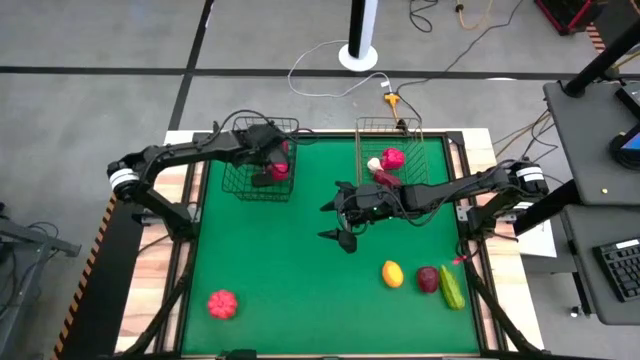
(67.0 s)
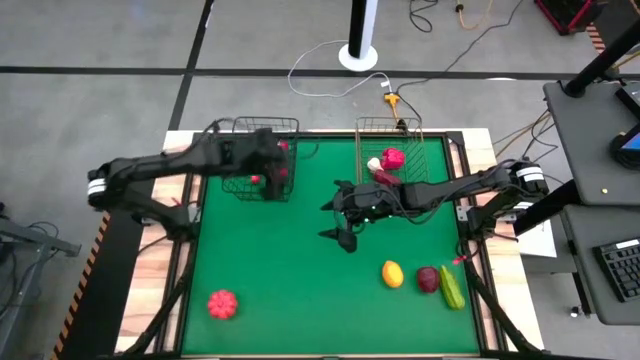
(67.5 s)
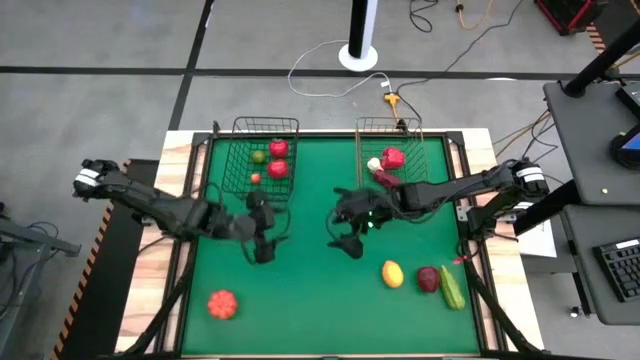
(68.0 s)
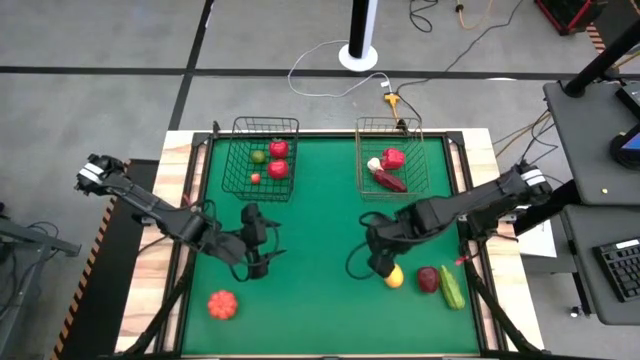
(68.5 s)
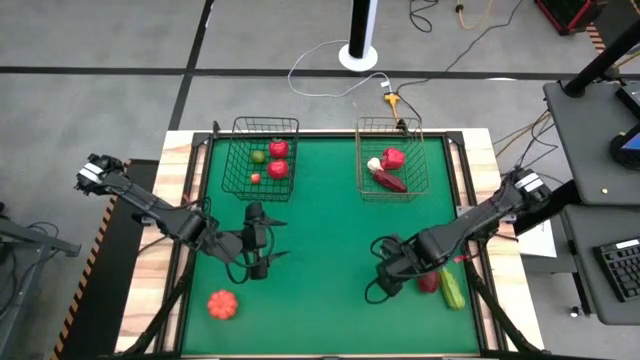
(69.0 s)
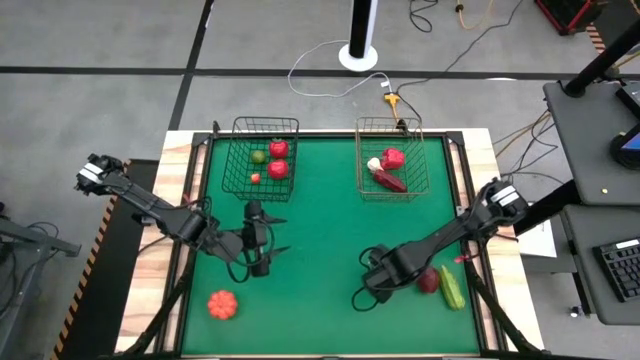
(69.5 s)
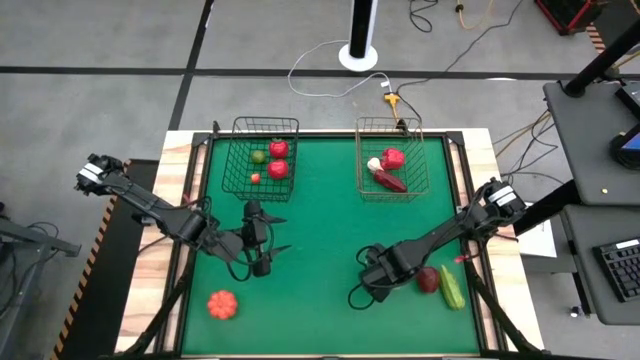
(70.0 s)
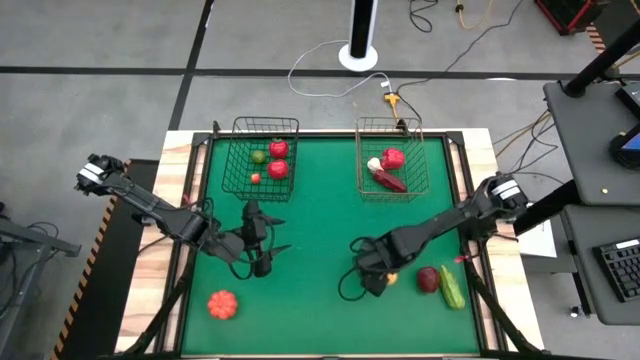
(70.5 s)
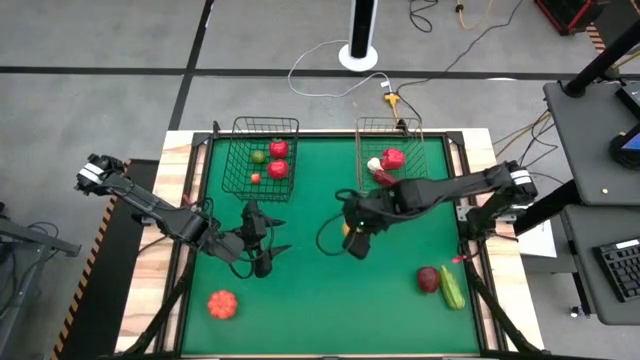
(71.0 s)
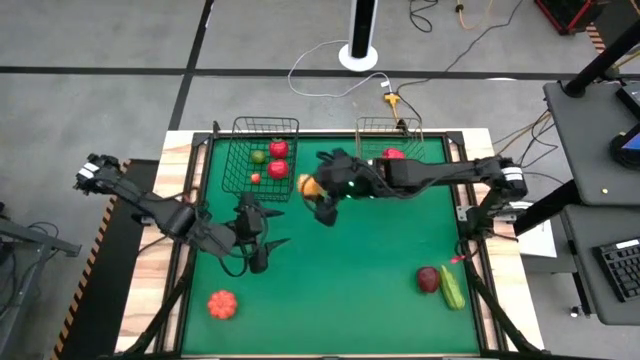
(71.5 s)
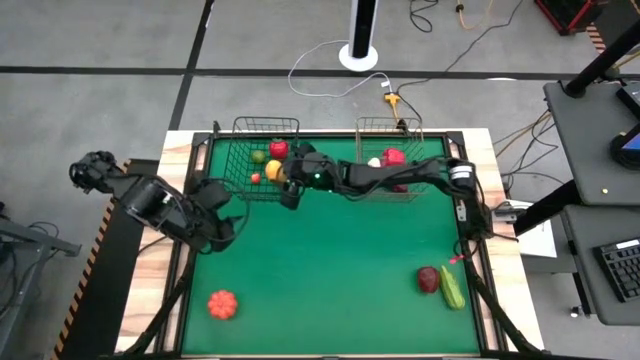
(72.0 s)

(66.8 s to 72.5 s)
Task: Sort produce into baskets
Put the lemon into the black wire basket

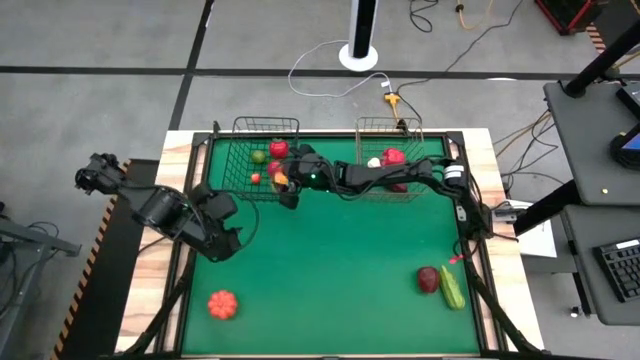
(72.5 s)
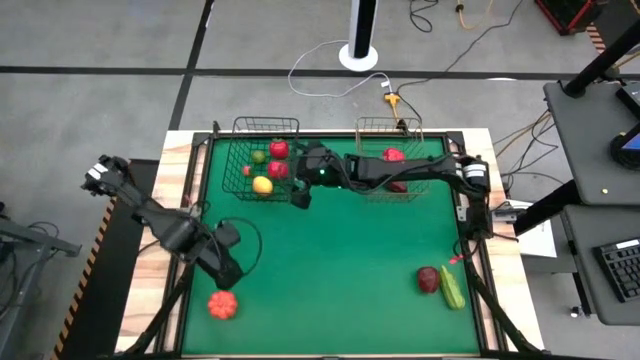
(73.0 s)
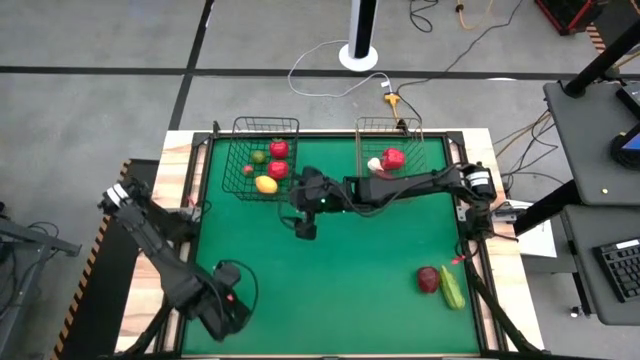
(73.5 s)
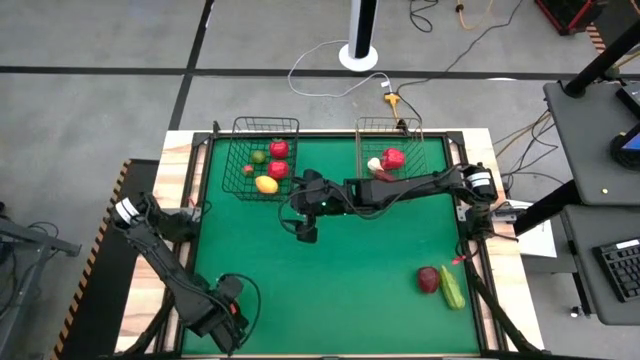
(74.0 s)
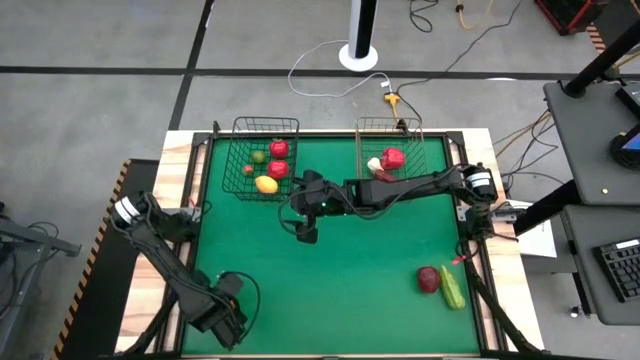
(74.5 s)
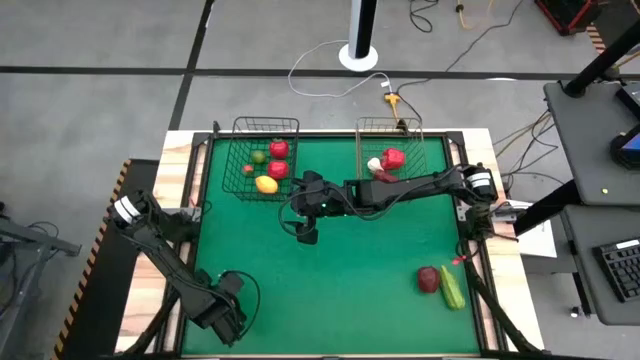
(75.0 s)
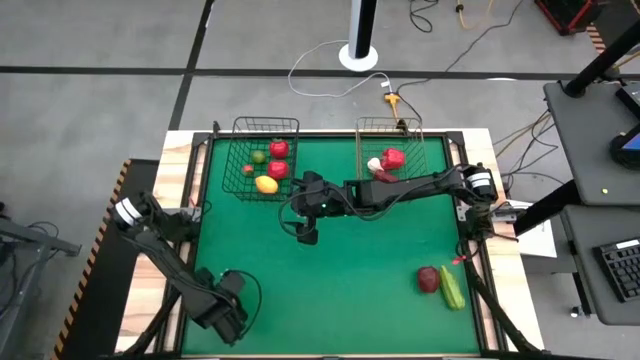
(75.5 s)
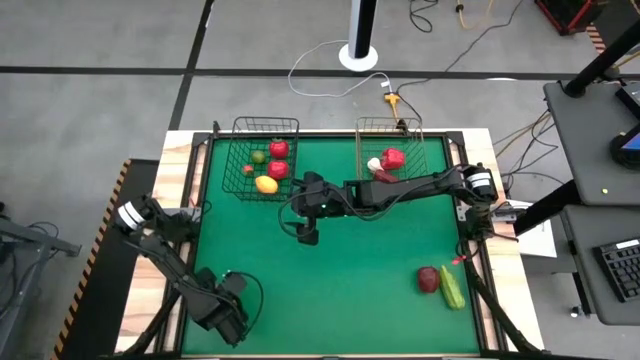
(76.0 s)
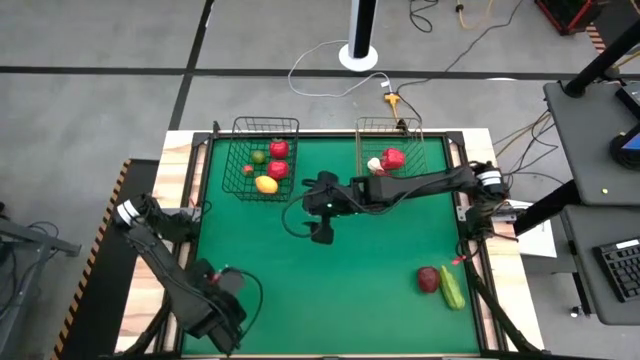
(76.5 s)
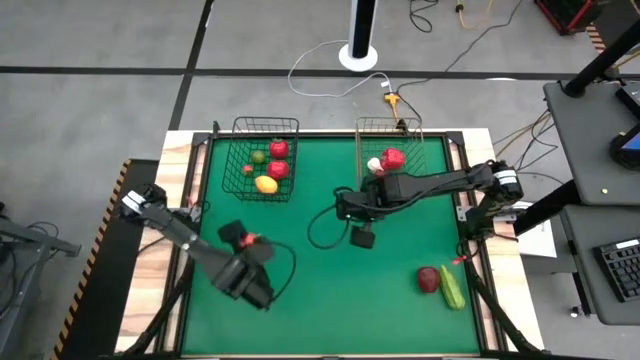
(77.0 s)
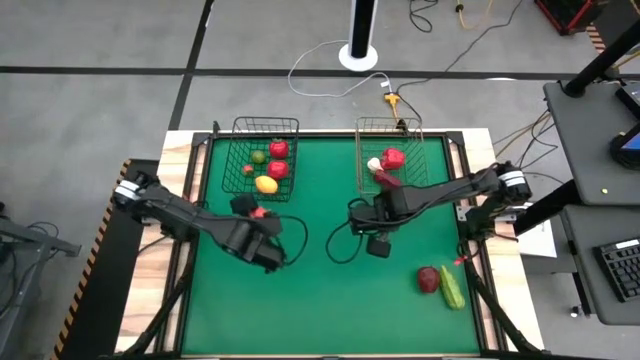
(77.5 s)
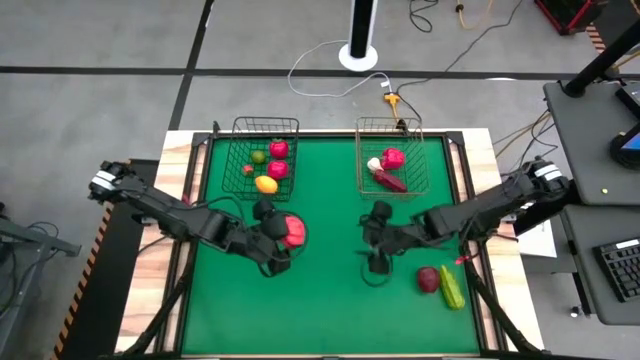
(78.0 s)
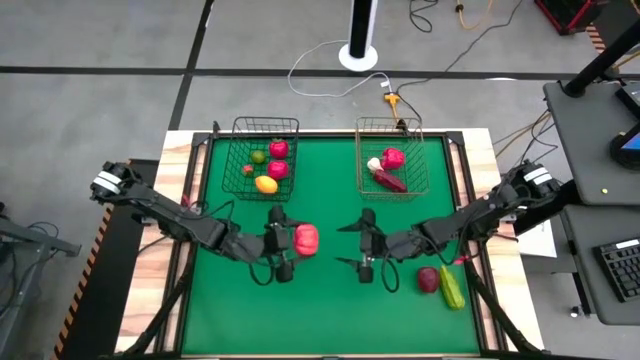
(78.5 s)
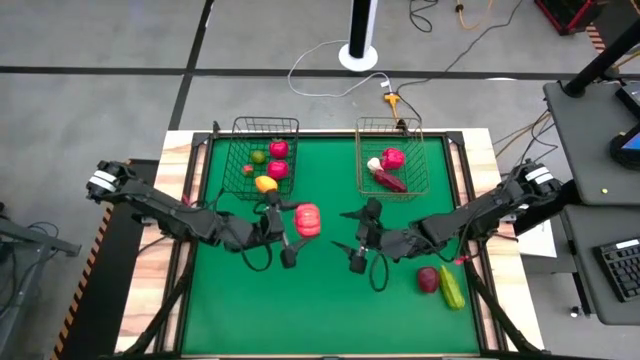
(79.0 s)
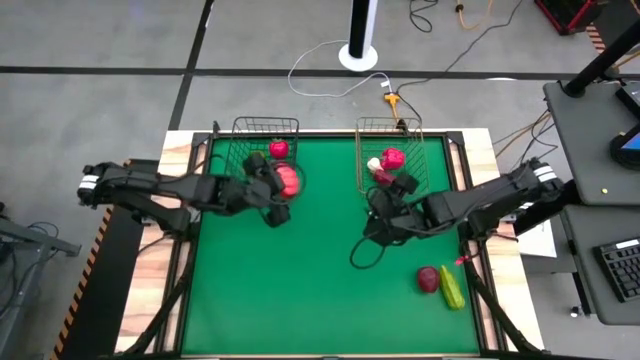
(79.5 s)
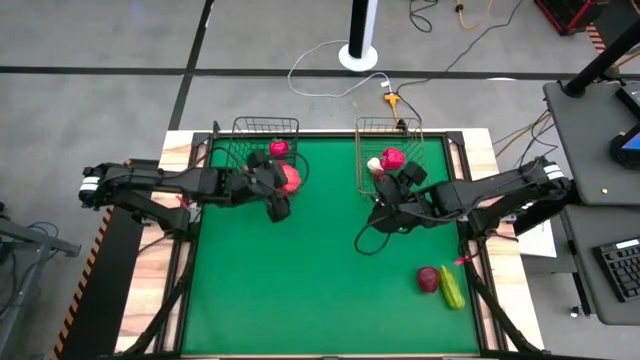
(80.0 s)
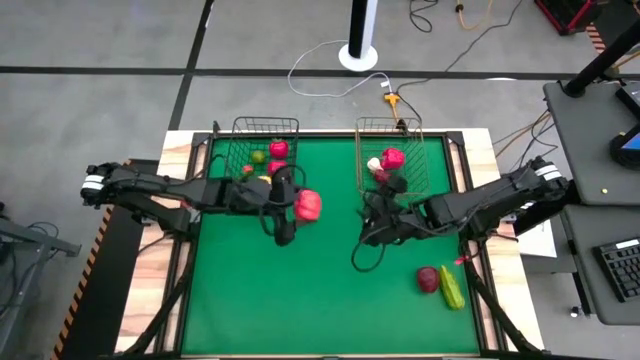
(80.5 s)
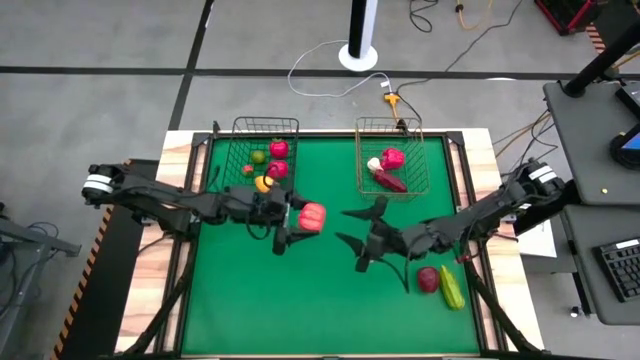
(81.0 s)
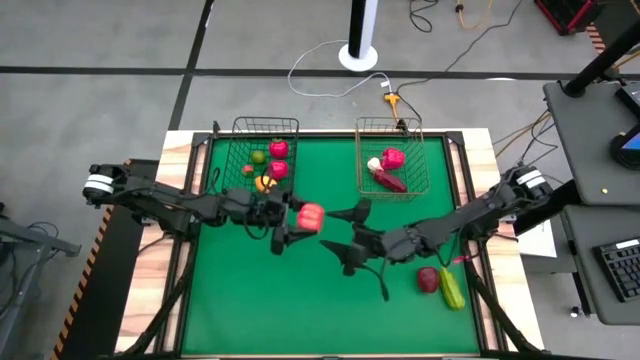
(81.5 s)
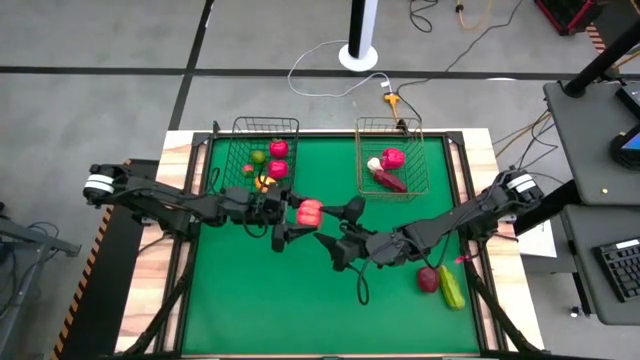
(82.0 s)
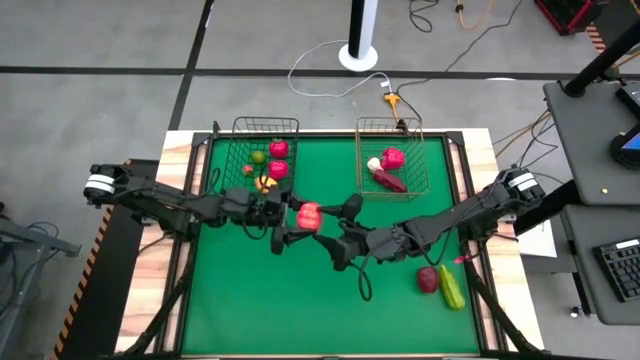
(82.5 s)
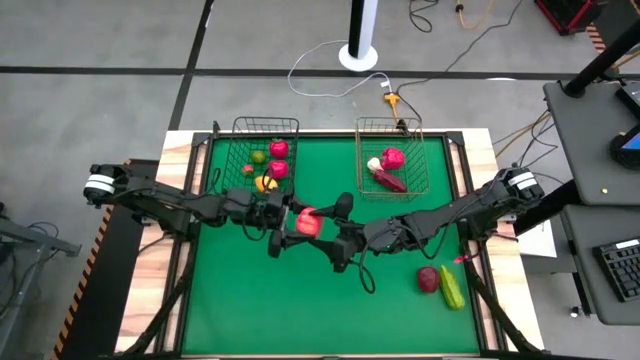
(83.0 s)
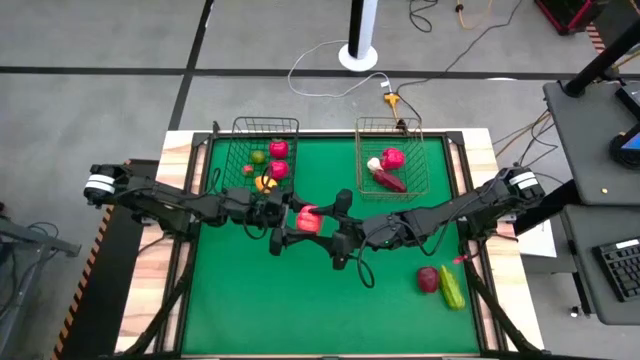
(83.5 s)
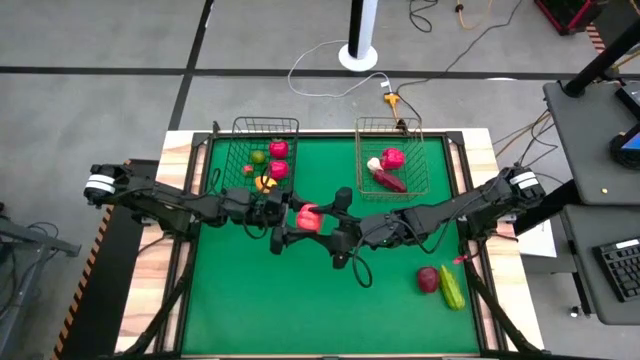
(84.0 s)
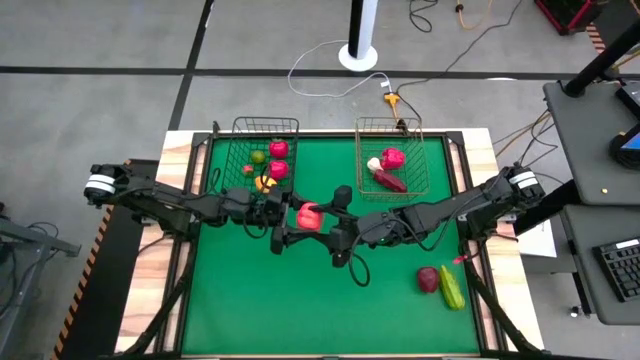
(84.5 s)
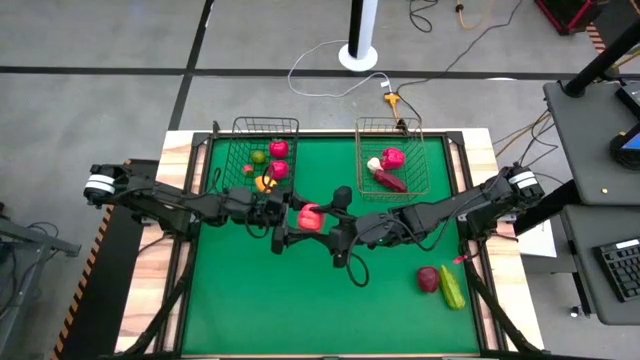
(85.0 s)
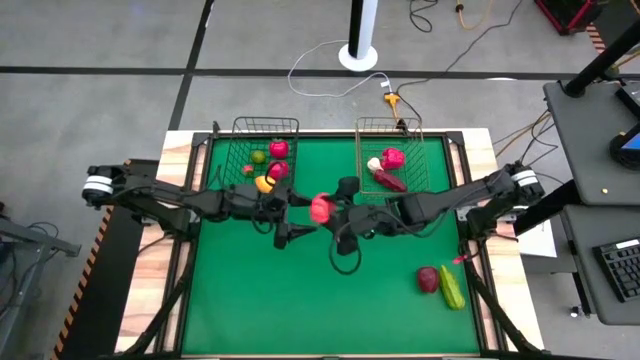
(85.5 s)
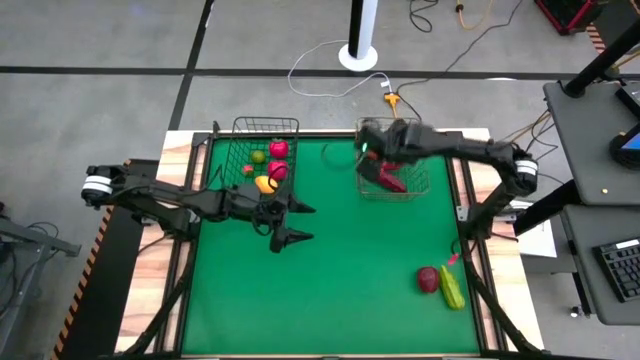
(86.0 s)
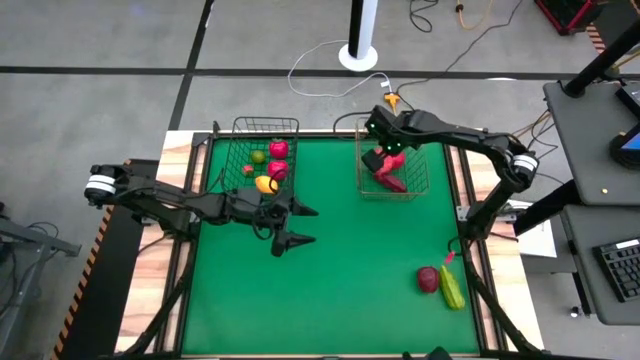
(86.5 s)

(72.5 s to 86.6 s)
Put the pumpkin into the gold wire basket

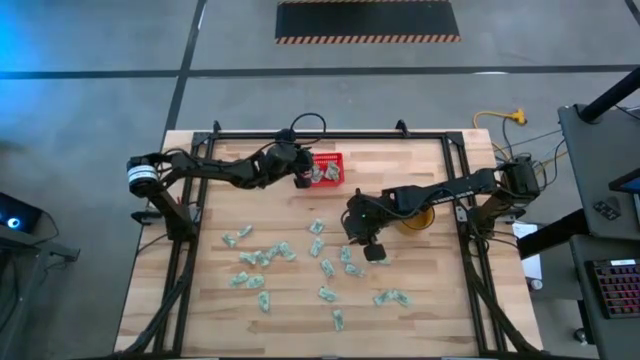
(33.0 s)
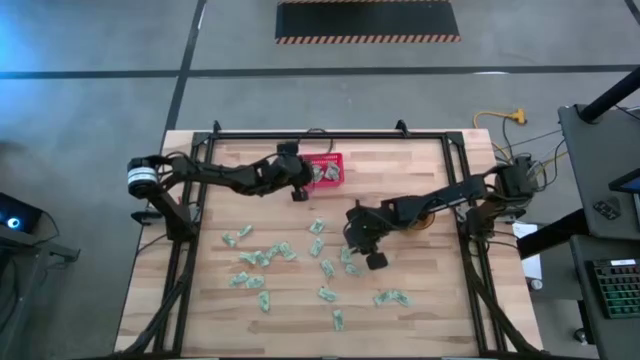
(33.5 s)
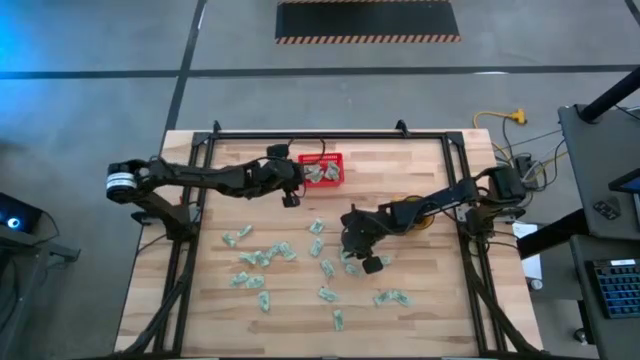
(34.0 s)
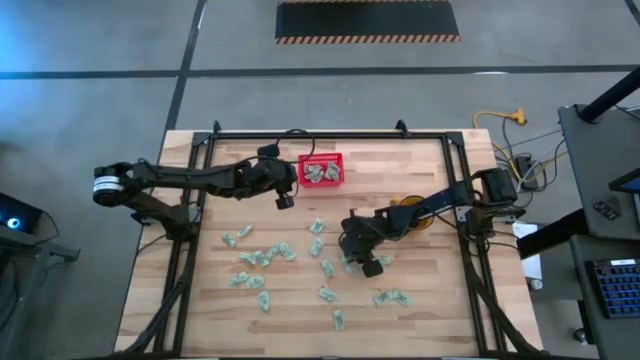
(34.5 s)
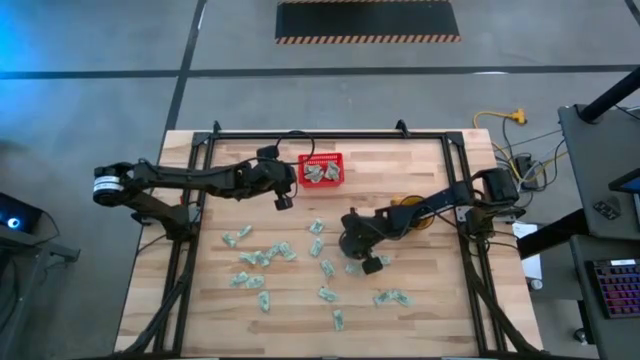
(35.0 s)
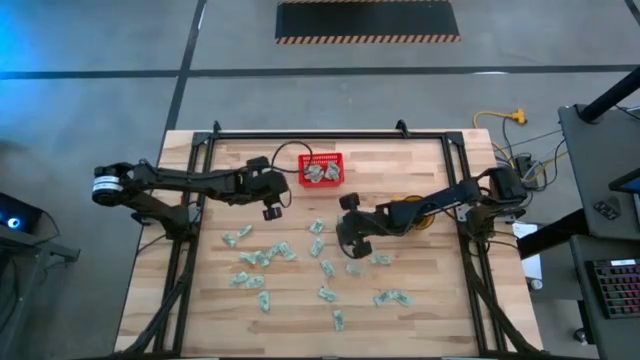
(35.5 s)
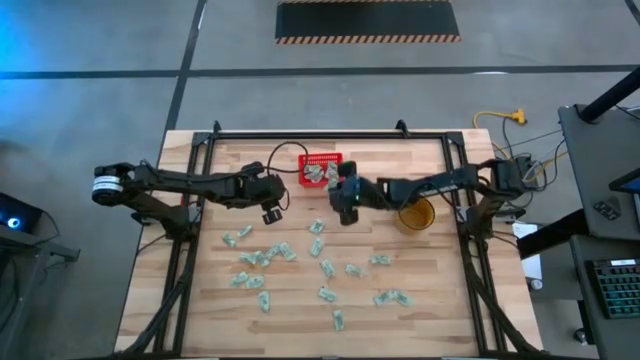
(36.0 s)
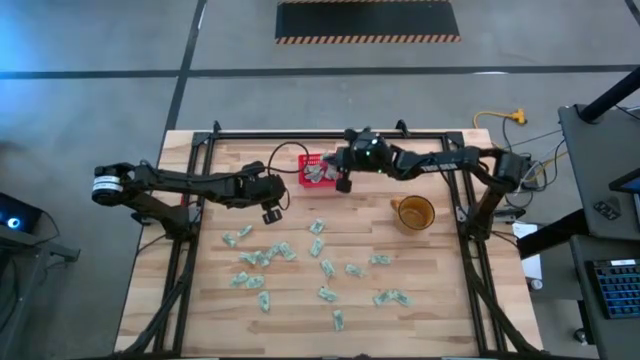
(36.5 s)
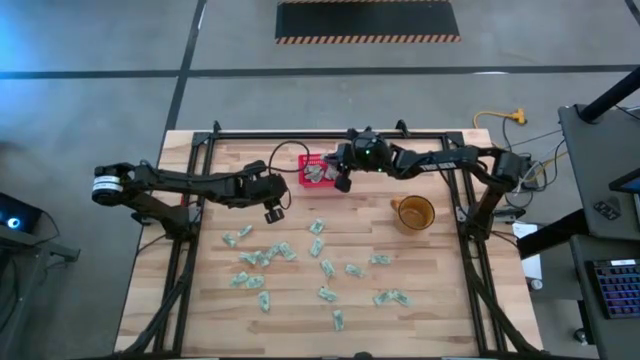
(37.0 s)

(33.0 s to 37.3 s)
Task: Pick and place Stevia / Truvia into bins
Put the white stevia packet into the red bin
